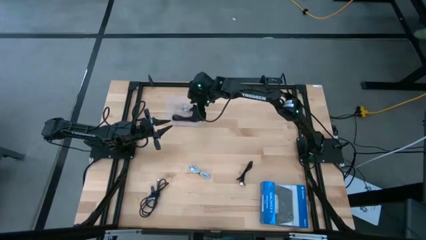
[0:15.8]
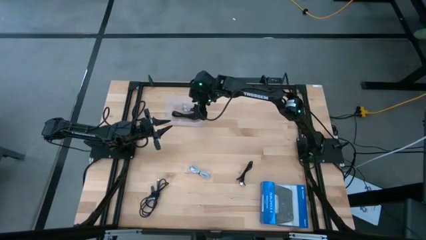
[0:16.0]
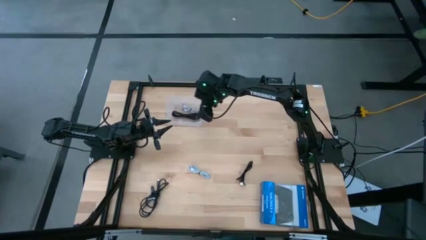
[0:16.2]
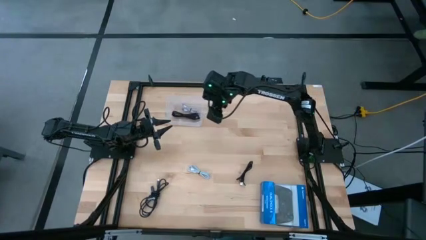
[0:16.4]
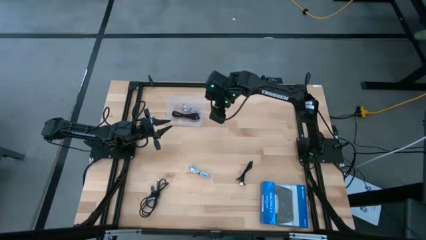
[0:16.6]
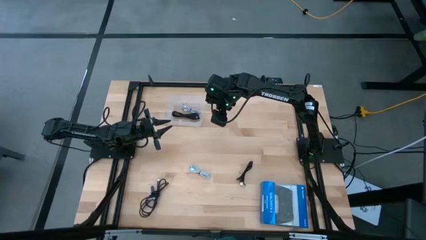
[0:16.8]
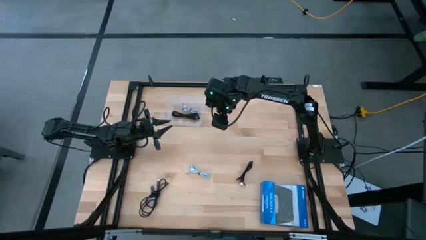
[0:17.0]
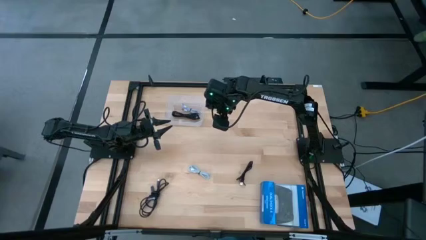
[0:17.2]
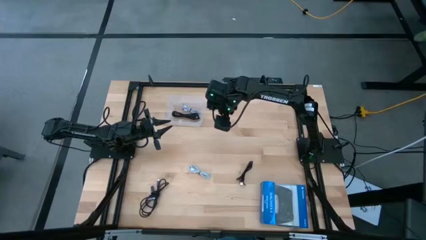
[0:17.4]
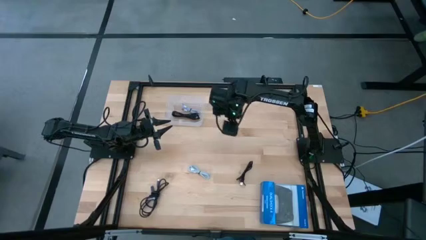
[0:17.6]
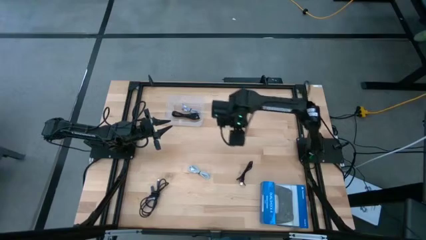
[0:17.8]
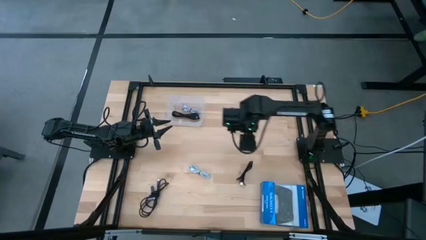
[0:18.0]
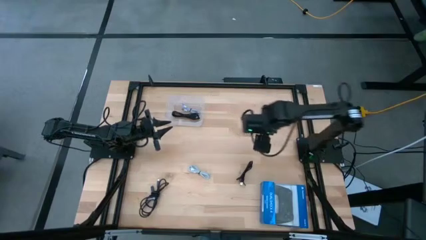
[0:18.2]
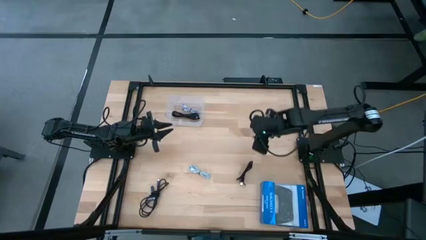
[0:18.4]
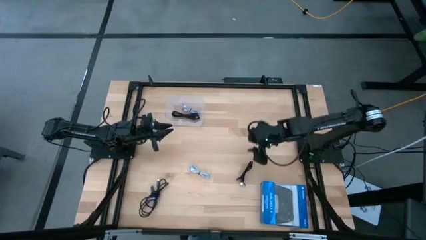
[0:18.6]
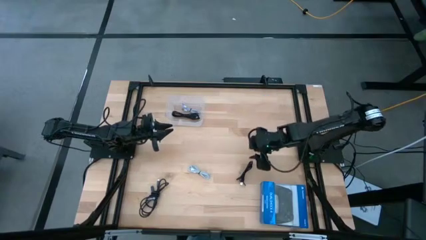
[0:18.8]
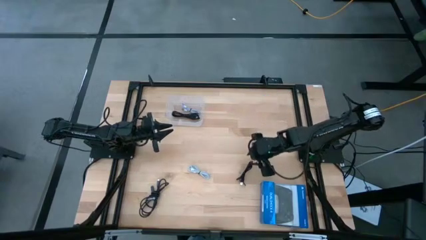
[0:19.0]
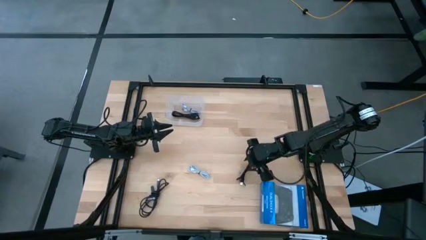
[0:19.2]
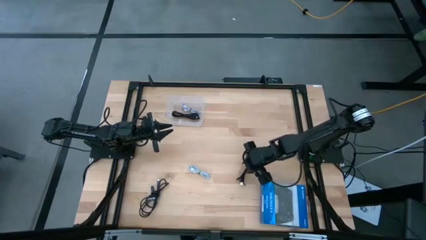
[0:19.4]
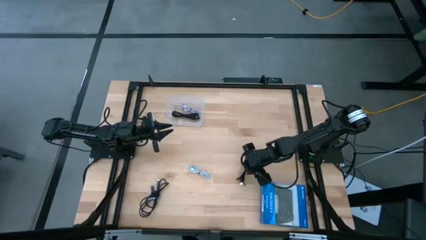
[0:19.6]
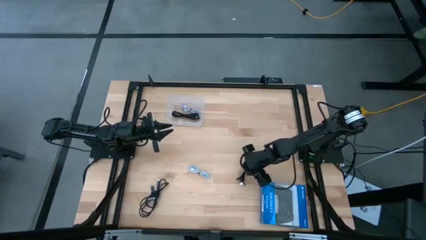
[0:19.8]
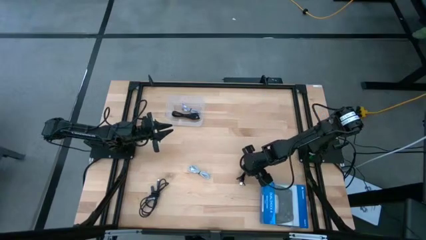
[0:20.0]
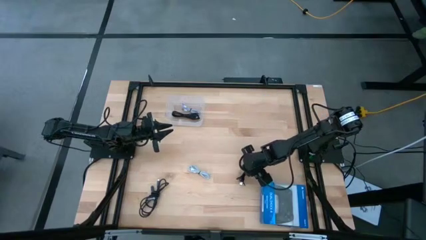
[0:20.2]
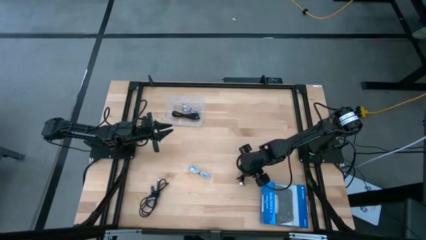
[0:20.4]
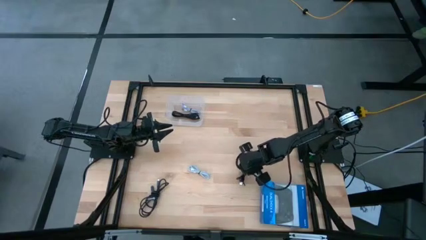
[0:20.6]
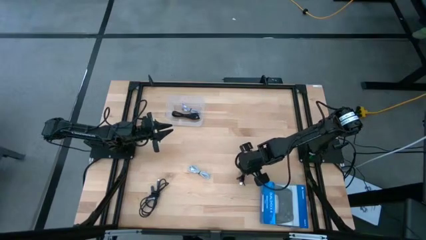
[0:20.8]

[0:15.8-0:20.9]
Task: Pick and place USB-C Cables
Put the black charger cable into the transparent bin

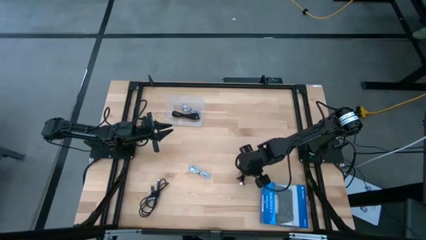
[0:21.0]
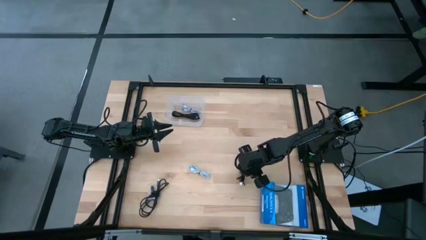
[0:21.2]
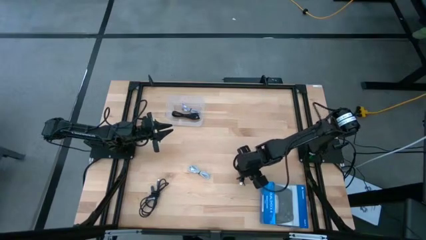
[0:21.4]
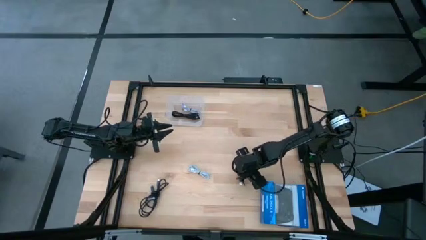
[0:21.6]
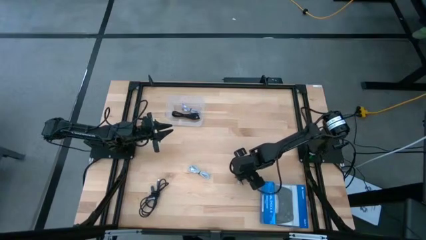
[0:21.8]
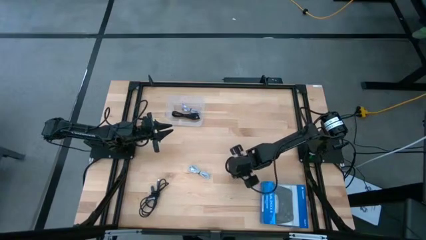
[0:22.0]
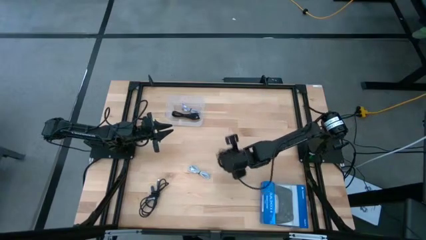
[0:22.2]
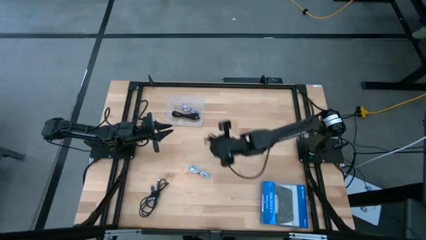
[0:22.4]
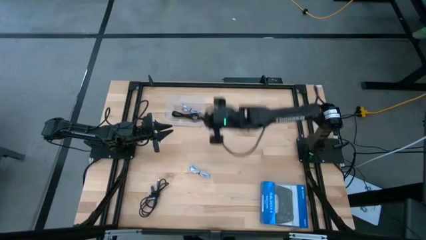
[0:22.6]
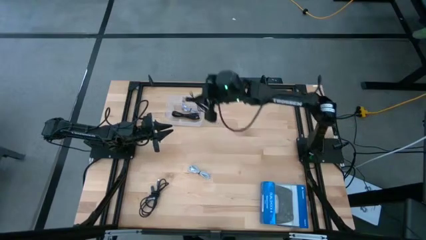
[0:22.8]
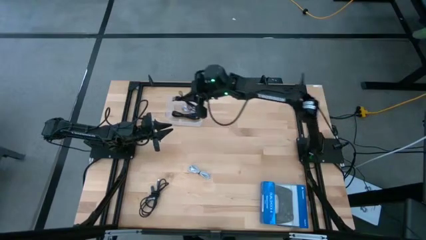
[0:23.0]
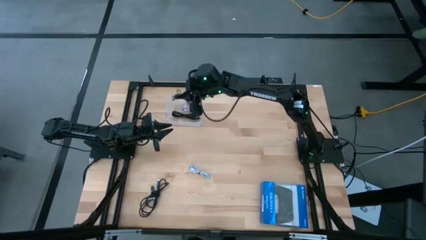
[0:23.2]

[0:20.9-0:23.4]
Put the black charger cable into the transparent bin

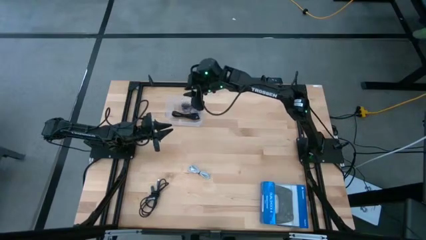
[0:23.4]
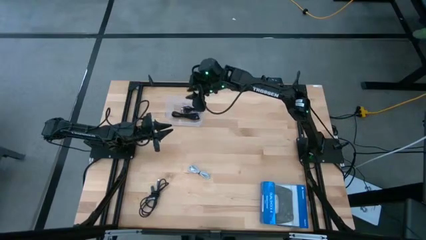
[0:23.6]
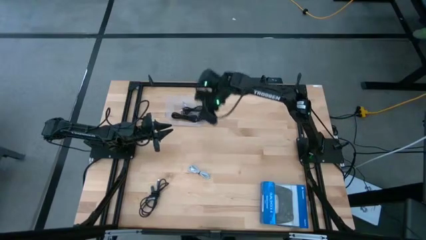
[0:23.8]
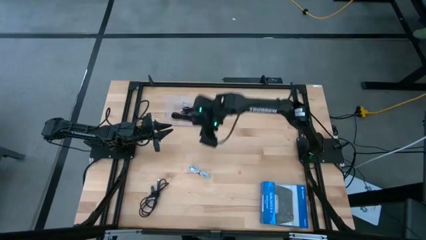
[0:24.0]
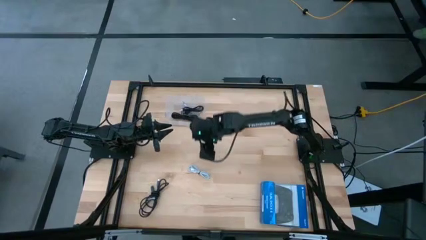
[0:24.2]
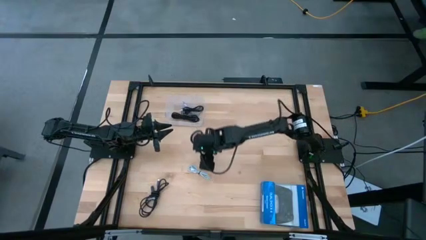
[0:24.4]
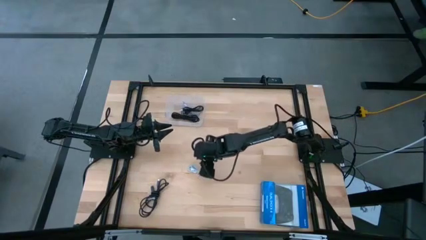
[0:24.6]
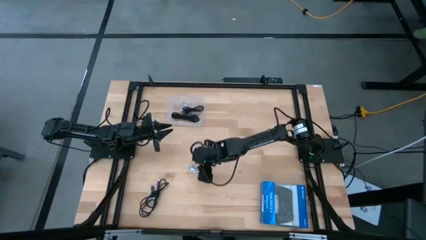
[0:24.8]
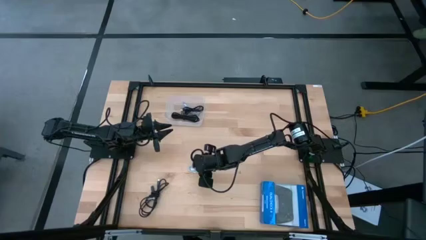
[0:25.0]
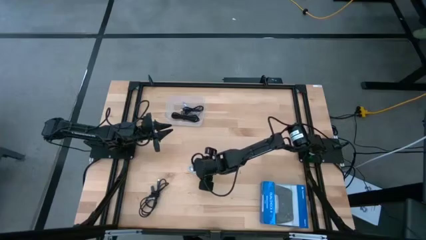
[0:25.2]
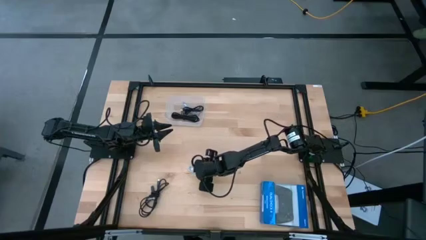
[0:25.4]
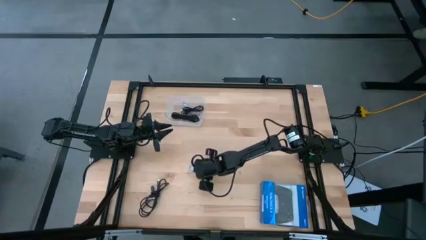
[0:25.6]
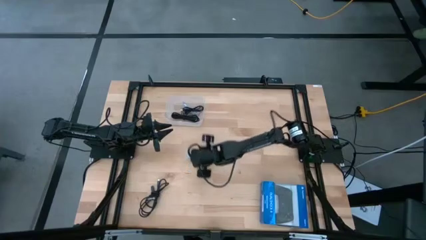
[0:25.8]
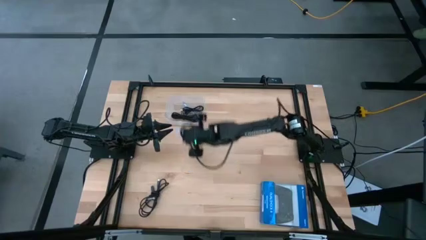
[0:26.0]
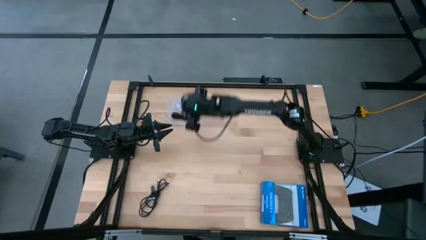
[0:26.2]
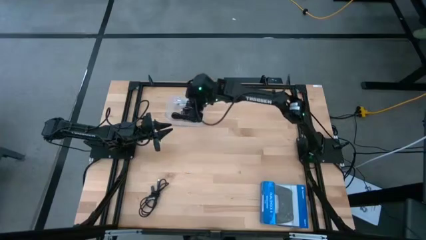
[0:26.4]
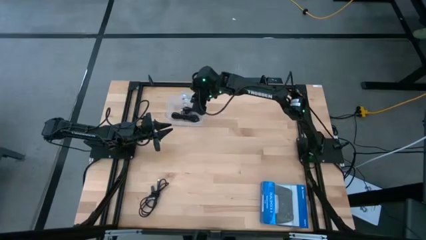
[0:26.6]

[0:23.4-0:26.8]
Put the white charger cable into the transparent bin

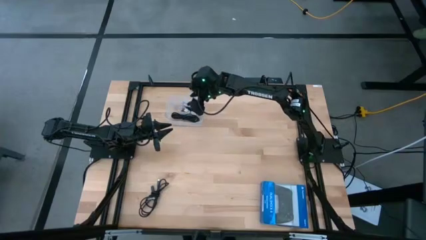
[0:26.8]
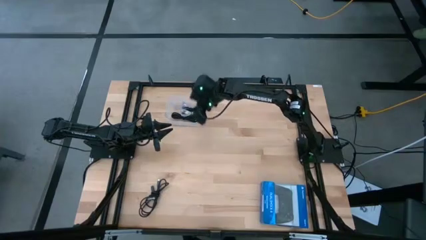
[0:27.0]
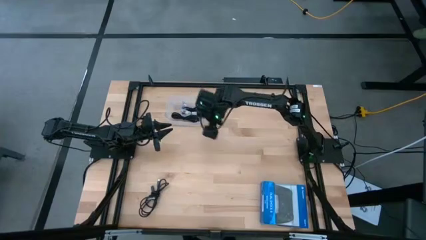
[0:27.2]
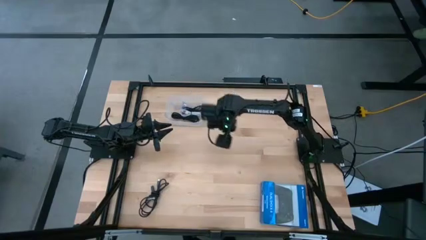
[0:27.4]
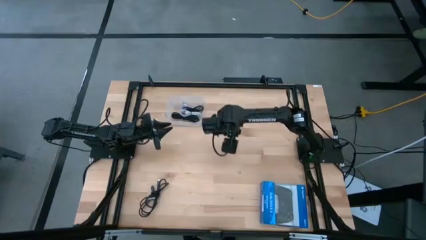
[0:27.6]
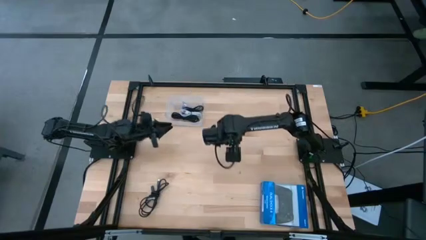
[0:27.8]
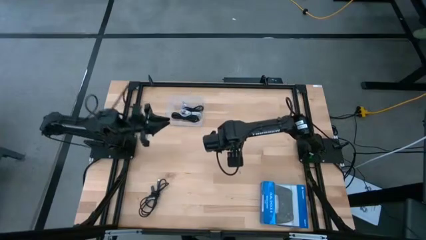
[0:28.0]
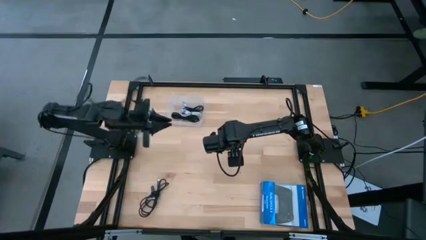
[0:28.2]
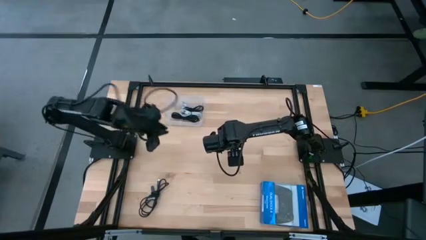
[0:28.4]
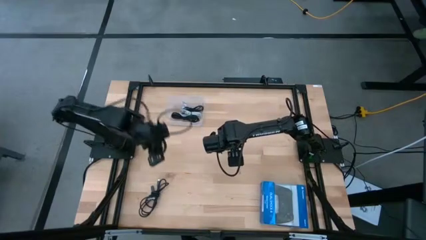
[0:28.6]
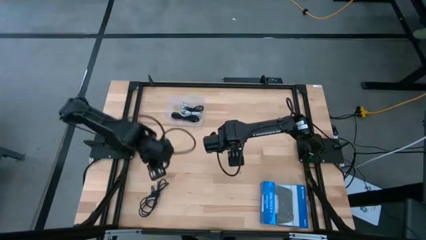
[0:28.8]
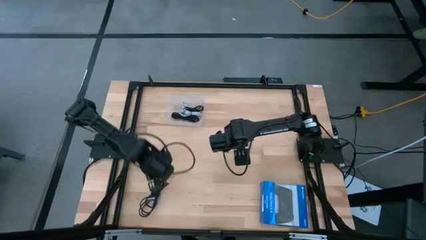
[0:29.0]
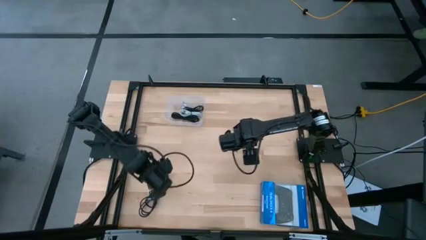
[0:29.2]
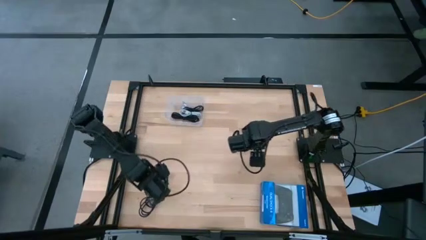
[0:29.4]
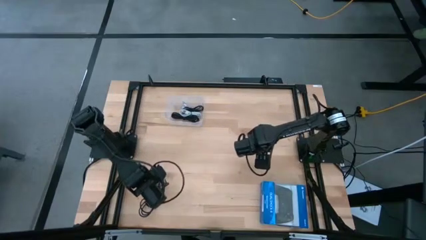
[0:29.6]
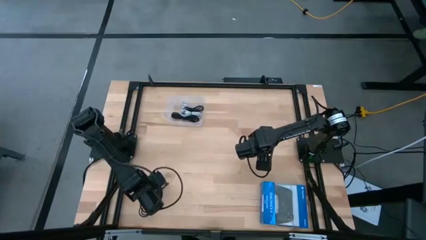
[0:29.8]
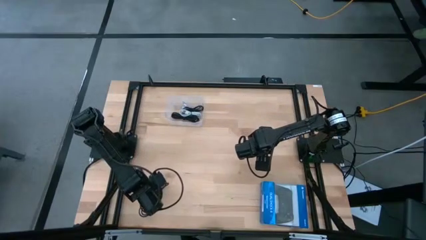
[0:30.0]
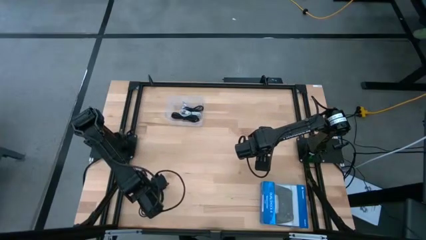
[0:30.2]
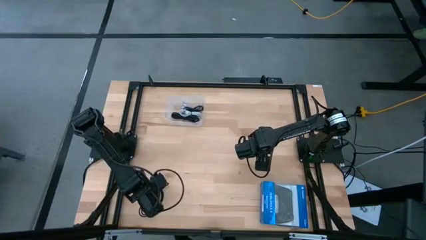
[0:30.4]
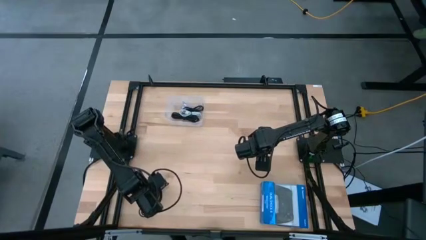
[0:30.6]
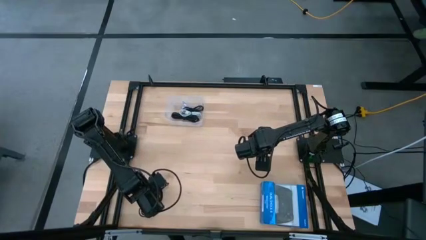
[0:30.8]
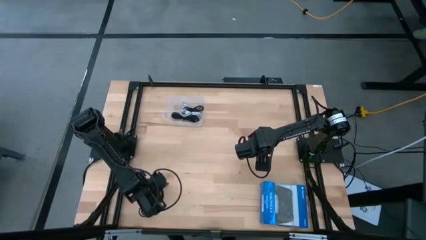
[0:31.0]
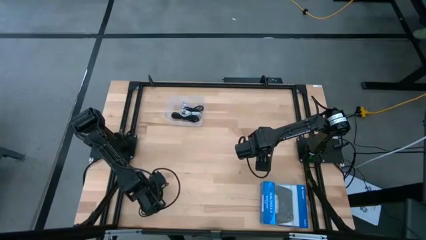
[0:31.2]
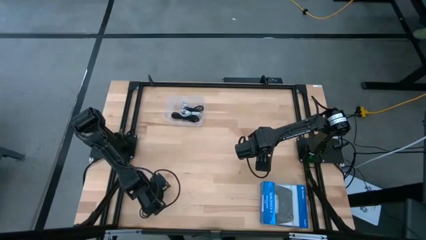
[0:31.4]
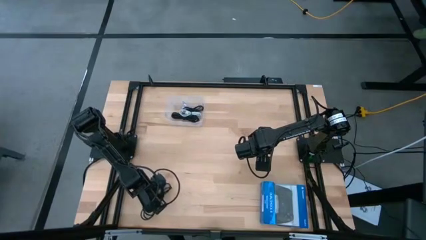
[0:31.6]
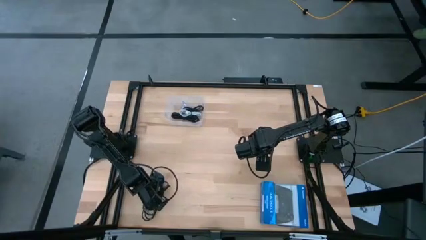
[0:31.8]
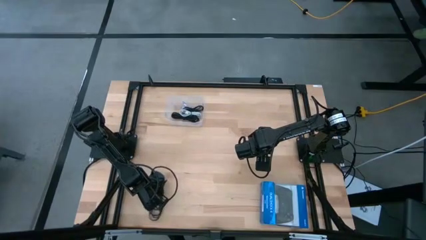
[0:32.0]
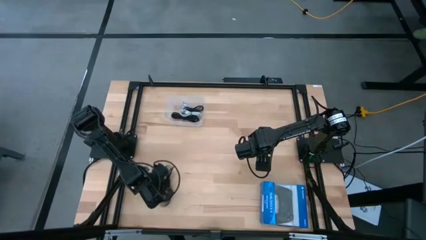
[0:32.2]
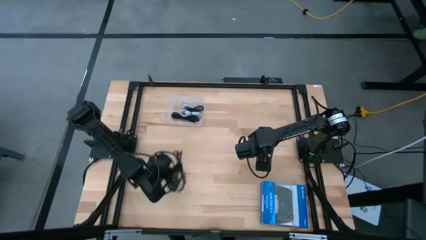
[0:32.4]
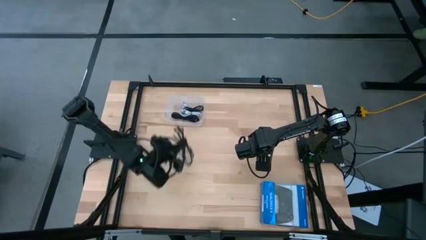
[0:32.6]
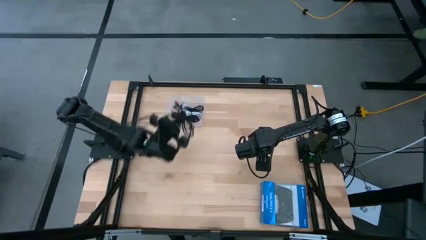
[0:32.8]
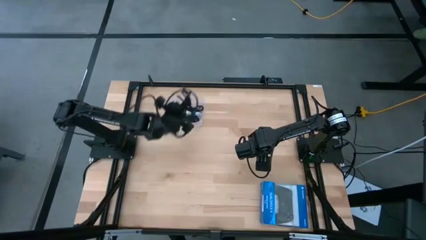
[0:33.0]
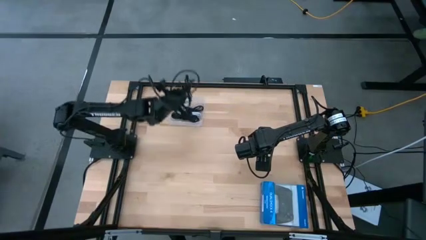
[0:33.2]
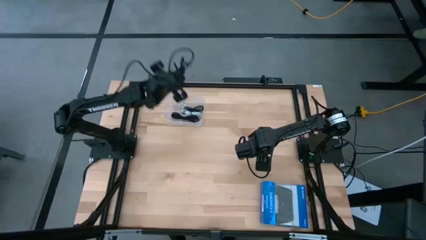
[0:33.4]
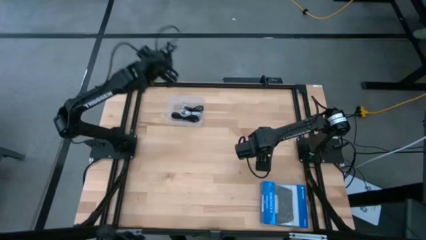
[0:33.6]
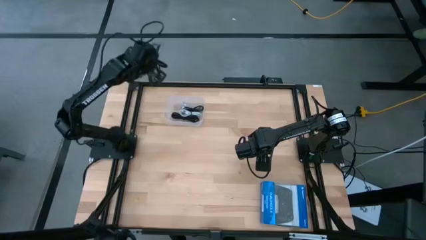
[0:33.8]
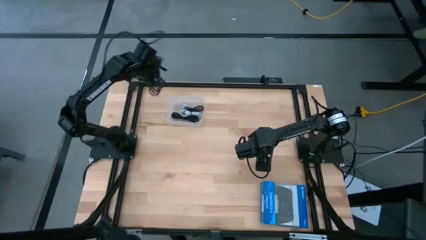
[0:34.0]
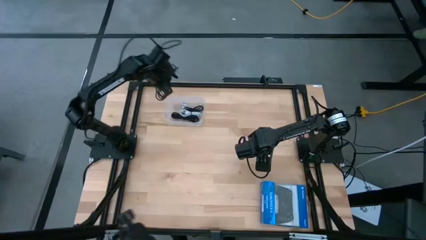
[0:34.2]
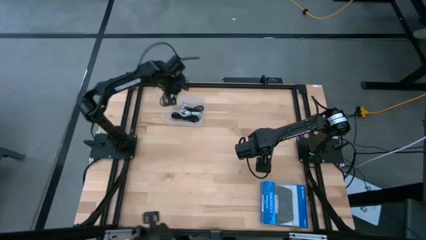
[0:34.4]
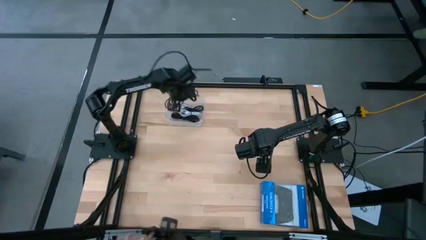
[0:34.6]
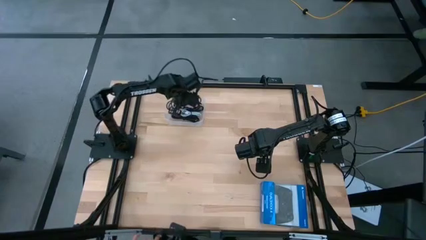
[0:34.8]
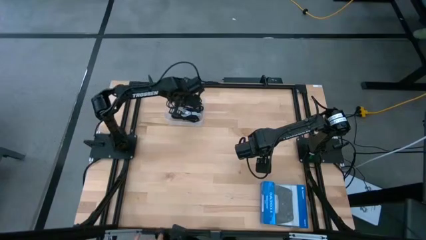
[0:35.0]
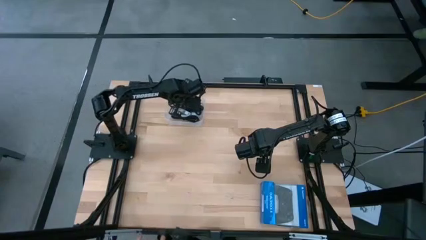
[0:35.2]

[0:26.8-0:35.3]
Put the black white charger cable into the transparent bin
